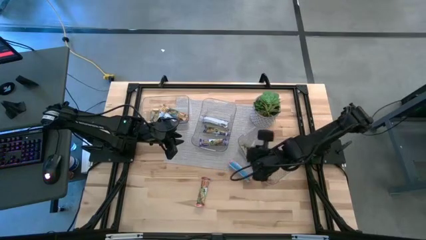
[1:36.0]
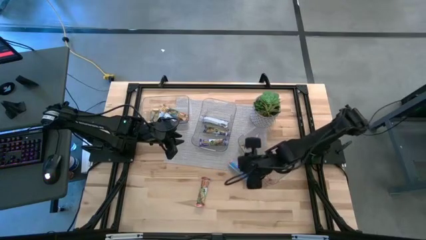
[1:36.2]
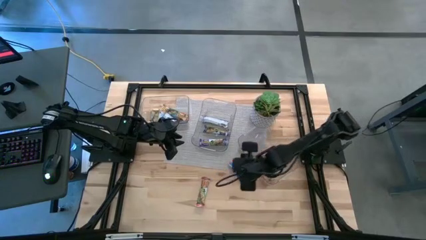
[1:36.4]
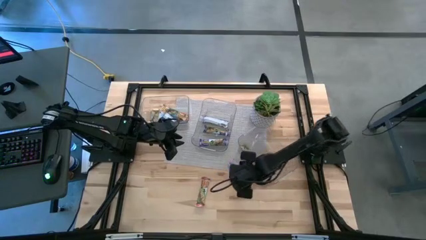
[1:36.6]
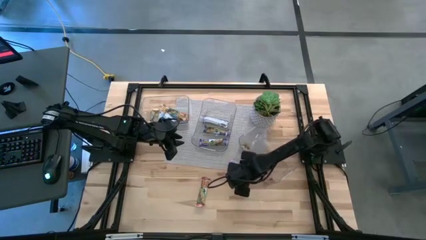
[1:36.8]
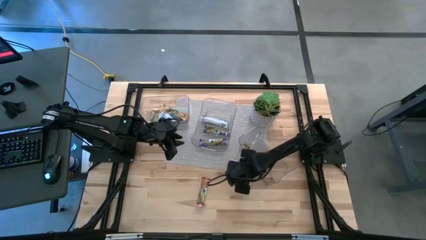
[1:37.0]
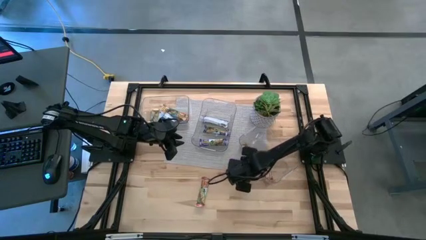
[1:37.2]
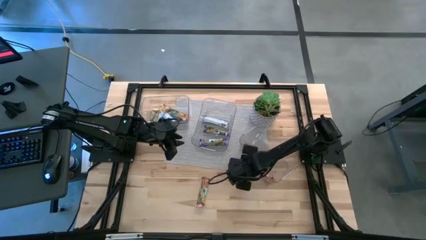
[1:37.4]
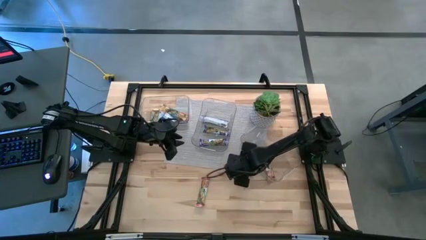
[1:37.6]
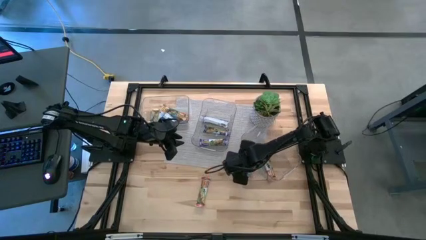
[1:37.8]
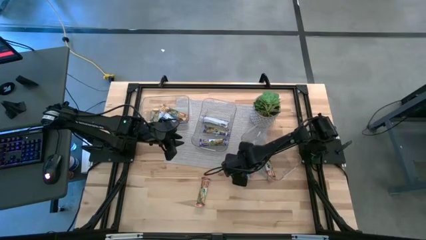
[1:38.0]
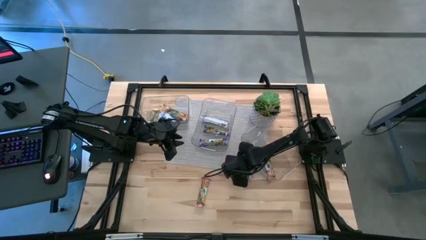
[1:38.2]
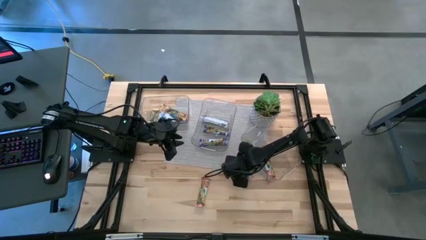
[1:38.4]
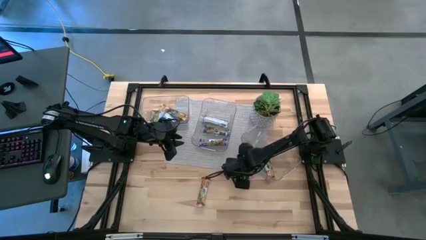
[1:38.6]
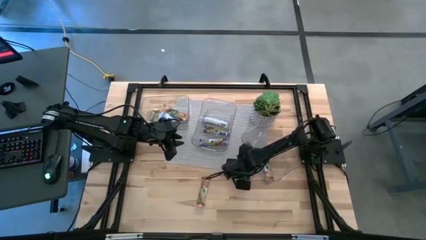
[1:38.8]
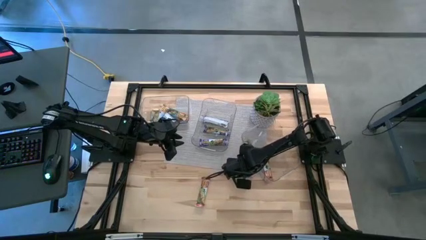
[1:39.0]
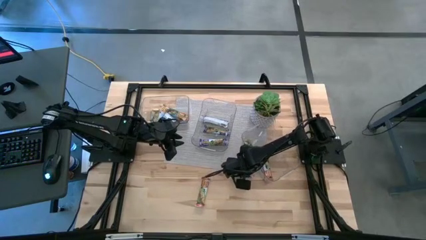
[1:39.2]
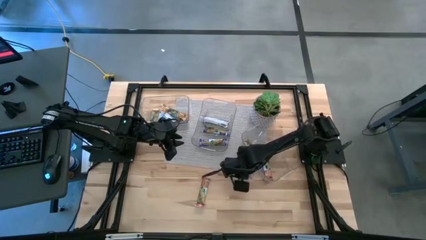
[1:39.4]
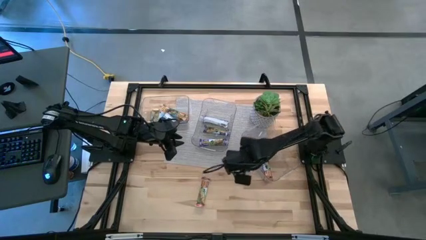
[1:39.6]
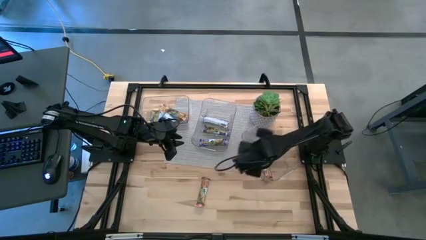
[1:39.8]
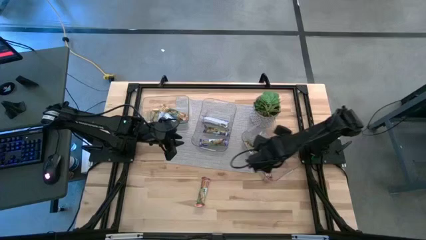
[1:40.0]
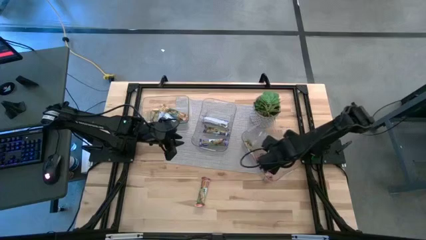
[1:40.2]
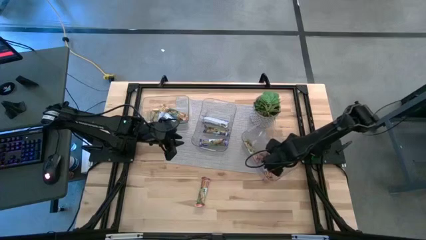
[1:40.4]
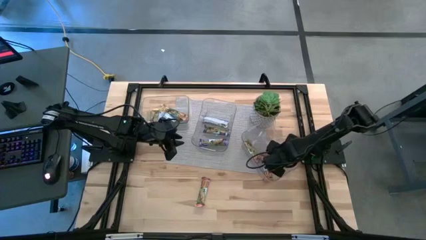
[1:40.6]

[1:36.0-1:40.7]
Task: Pick and place Granola Bars by type
Put the red granola bar into the right transparent bin

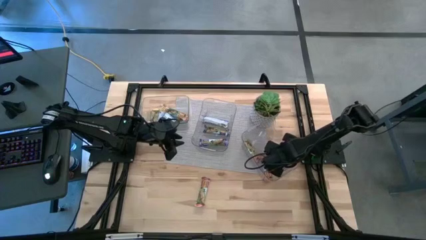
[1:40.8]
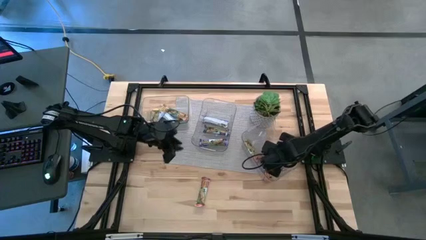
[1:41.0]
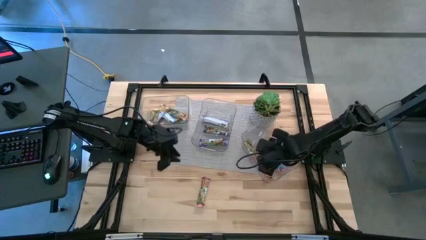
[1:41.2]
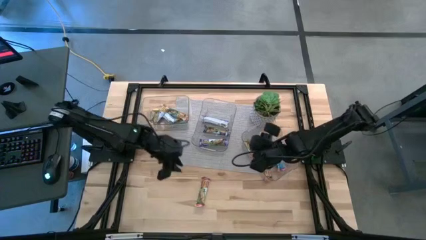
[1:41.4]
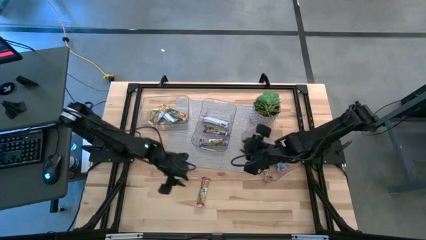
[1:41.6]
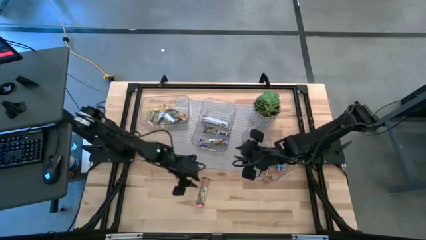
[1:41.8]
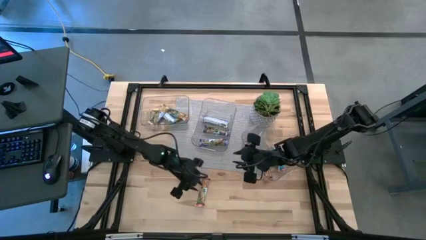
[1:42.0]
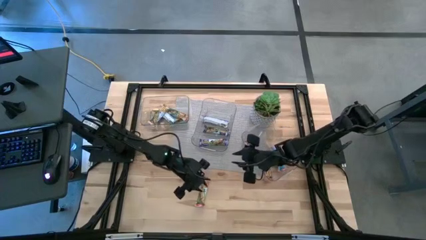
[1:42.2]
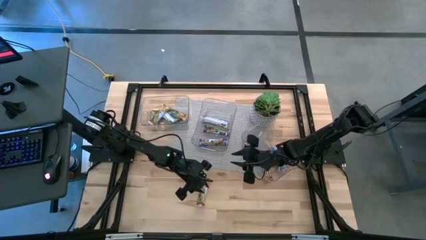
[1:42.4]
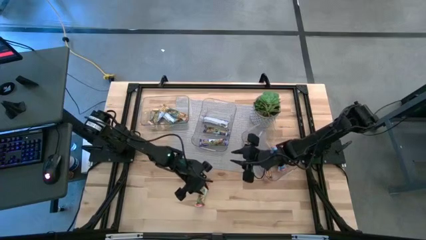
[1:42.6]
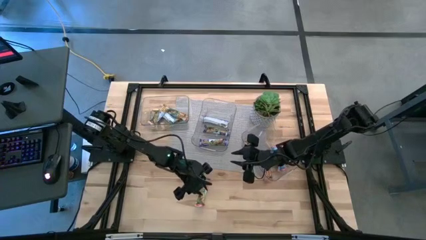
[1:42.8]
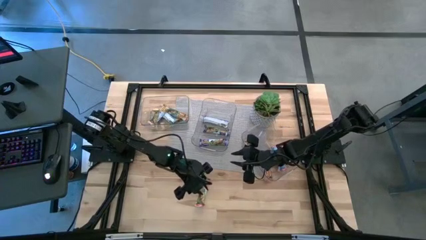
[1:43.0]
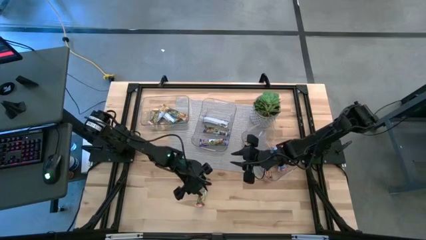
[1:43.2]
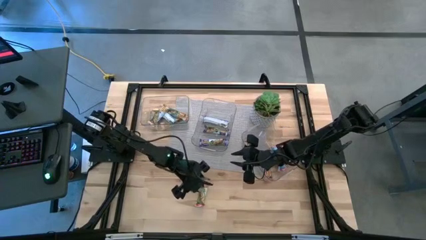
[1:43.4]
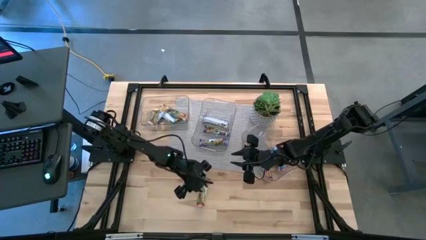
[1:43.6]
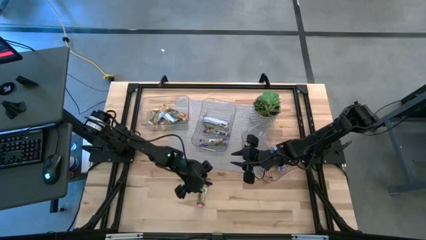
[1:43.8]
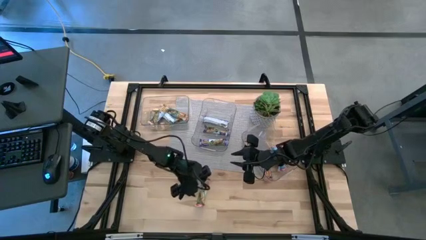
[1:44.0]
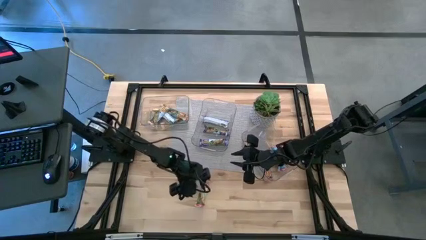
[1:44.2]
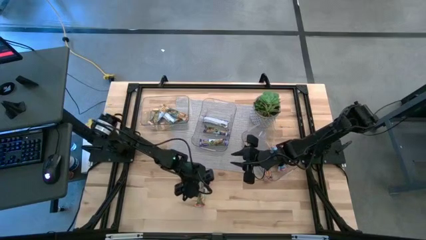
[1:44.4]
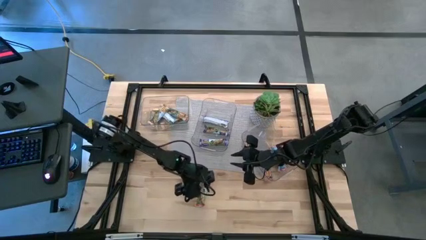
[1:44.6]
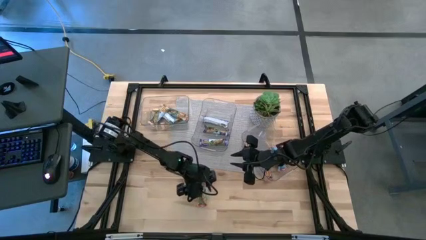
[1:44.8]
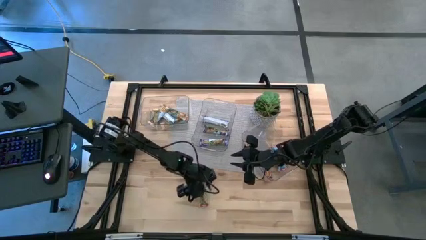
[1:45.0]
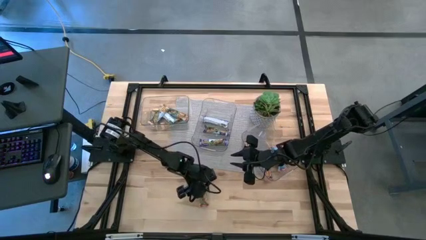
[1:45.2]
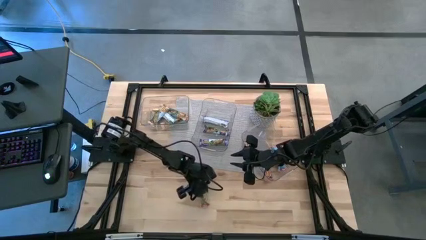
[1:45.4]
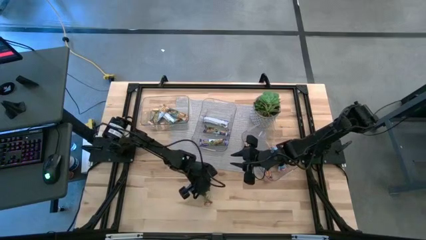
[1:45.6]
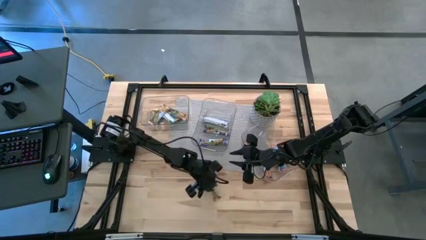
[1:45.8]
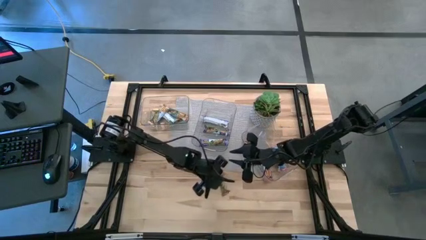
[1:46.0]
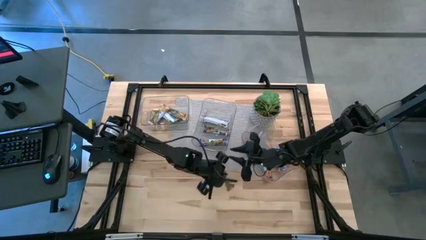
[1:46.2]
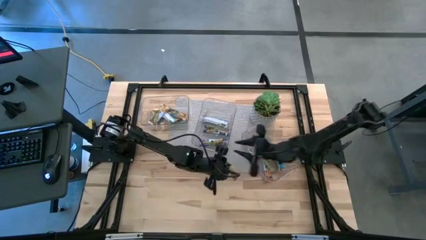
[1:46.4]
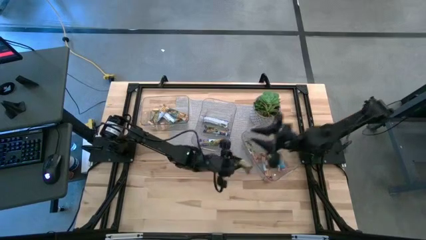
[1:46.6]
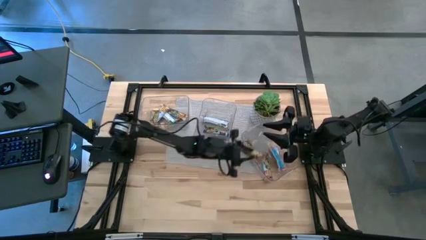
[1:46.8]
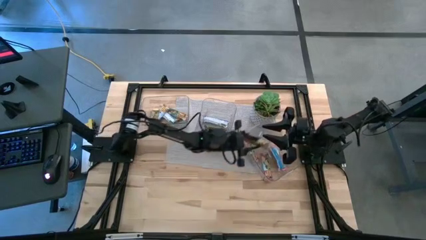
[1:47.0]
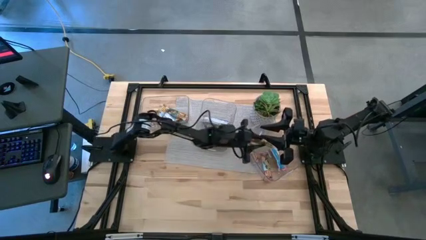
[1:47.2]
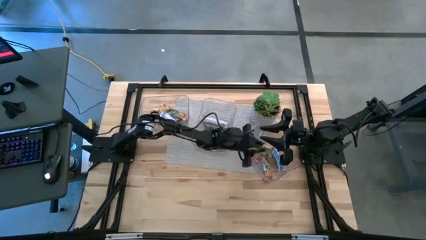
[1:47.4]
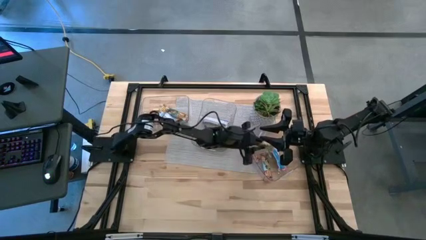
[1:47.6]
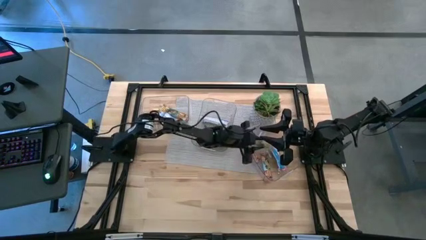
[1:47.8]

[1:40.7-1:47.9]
Put the red granola bar into the right transparent bin

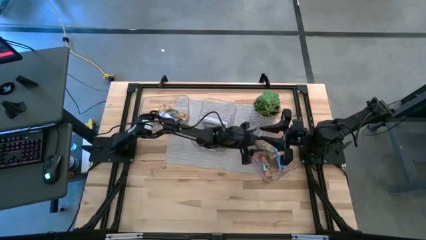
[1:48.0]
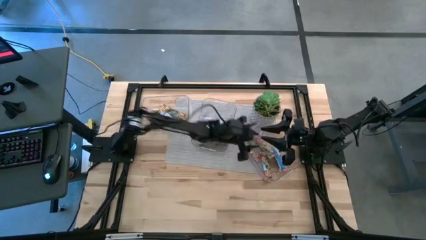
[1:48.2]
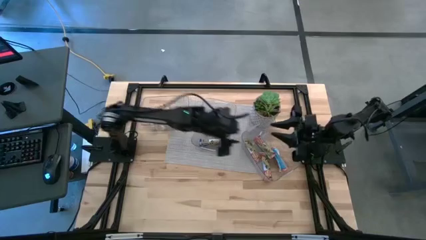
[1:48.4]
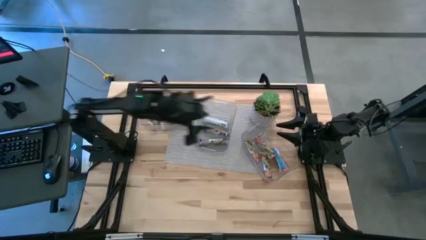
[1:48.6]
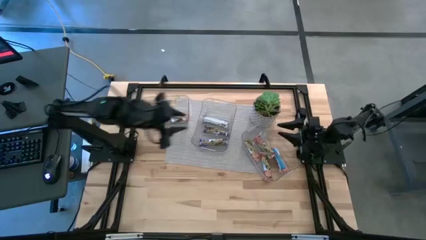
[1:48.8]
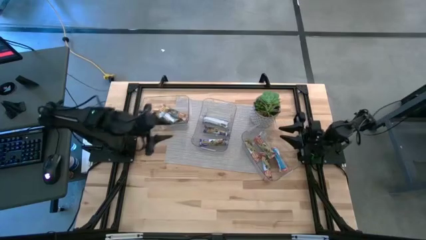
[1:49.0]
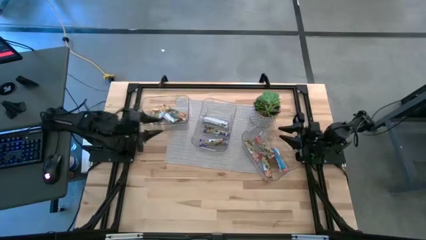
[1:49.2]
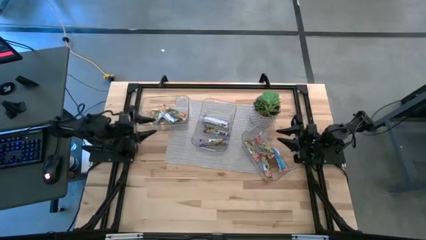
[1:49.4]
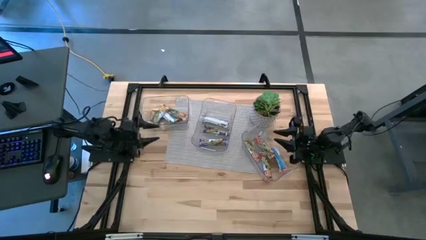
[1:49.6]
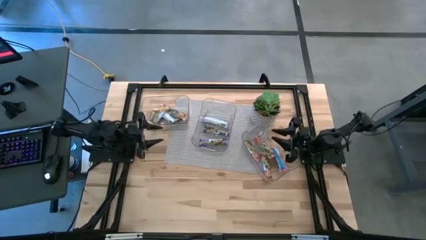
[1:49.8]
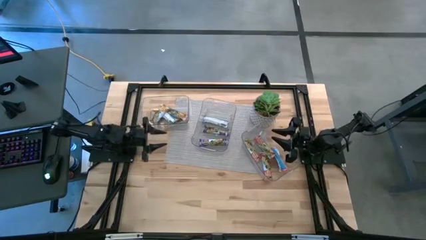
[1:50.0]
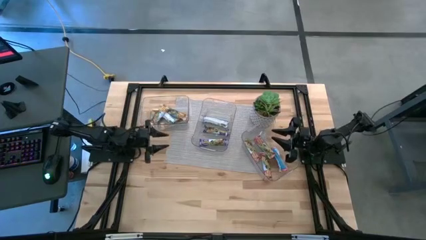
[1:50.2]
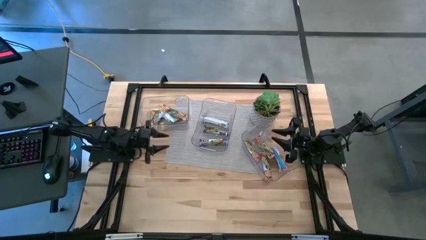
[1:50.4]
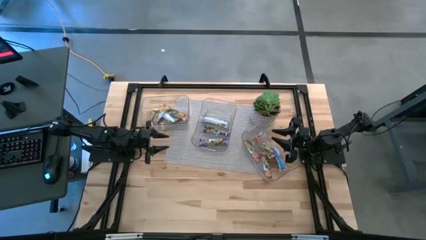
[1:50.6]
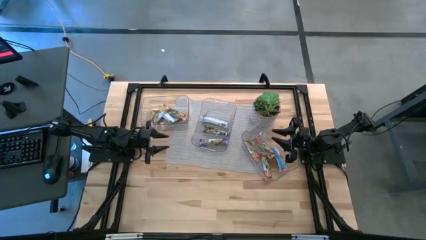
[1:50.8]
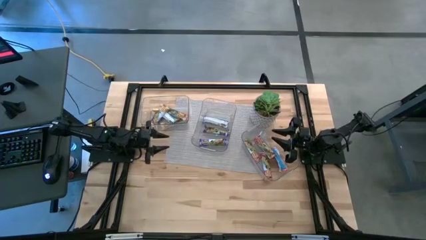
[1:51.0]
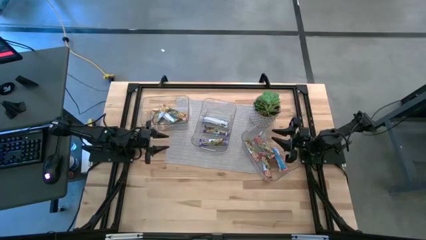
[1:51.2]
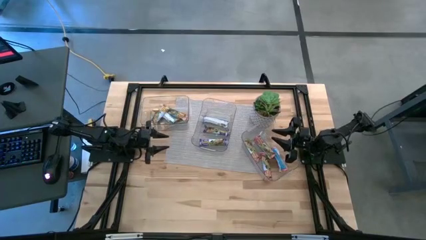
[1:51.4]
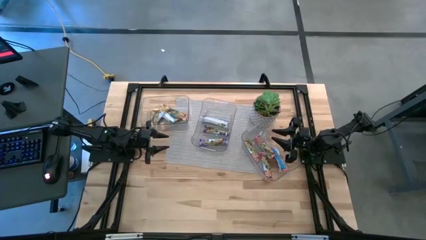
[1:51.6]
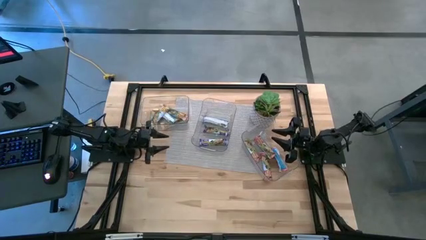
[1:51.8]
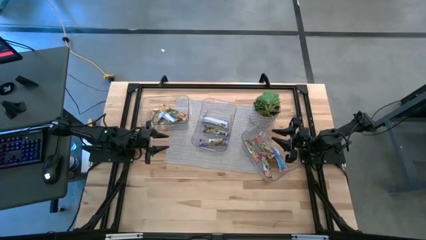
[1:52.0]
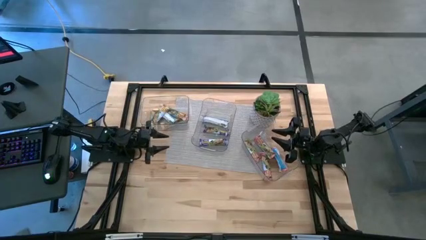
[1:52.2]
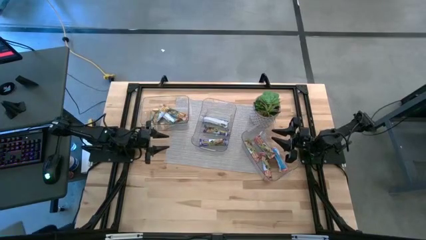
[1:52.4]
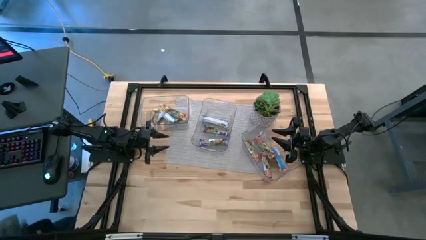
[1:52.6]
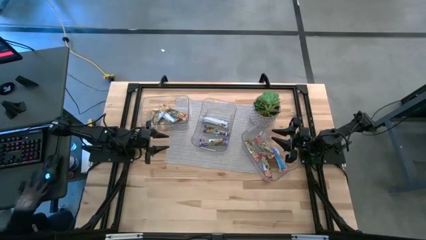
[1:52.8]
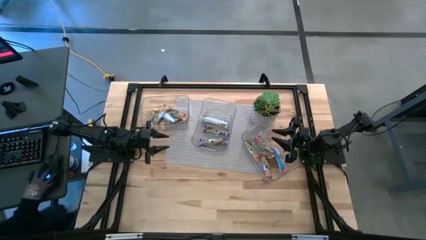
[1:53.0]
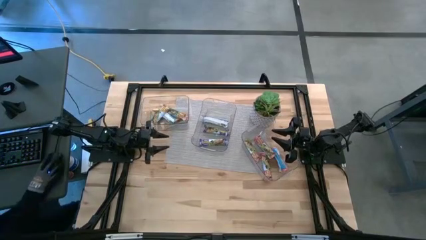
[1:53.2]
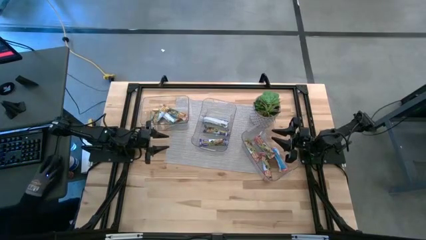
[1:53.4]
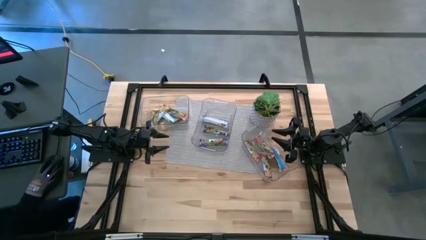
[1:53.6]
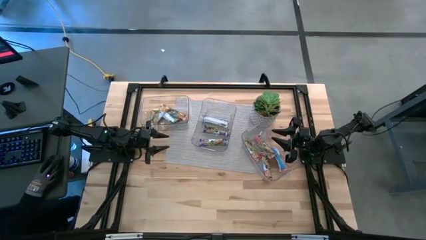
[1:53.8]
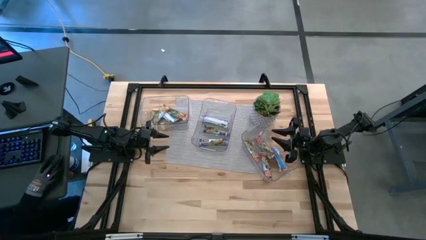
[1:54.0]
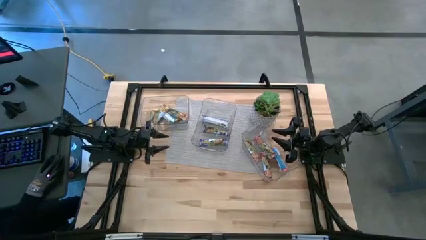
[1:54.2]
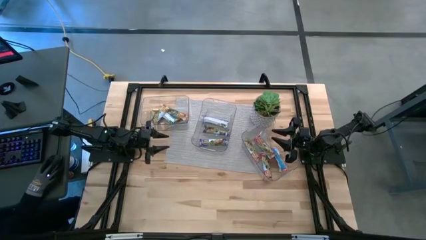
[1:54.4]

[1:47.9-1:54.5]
Return to Home Position
